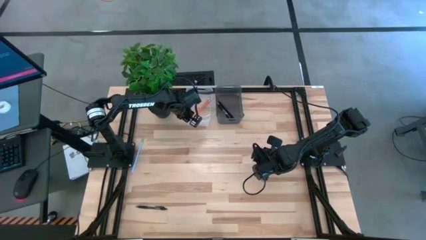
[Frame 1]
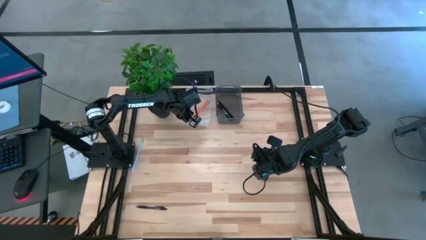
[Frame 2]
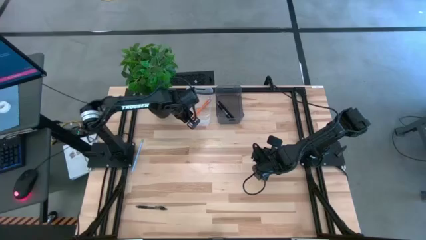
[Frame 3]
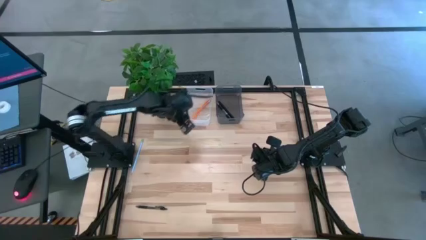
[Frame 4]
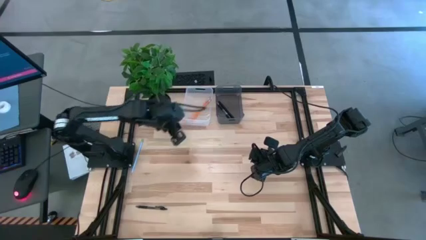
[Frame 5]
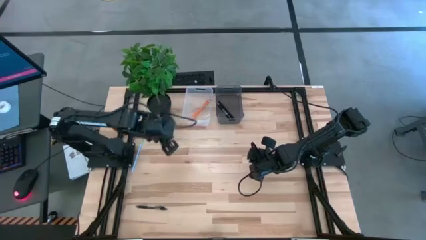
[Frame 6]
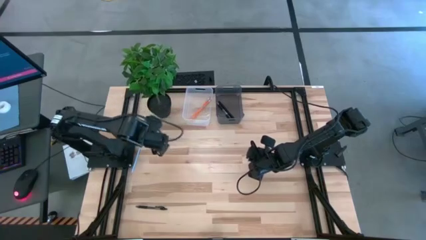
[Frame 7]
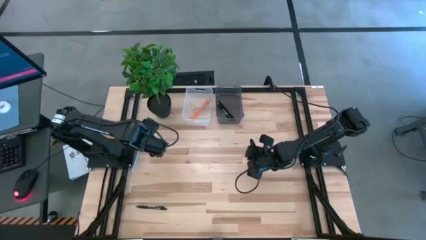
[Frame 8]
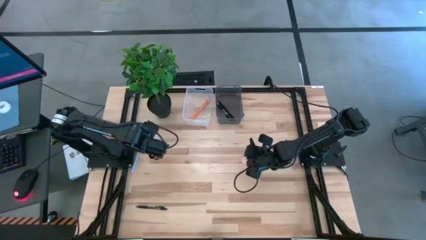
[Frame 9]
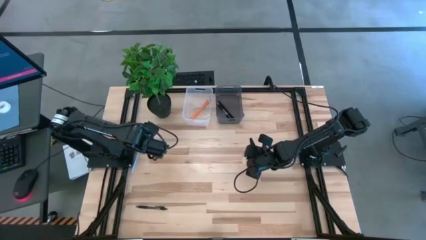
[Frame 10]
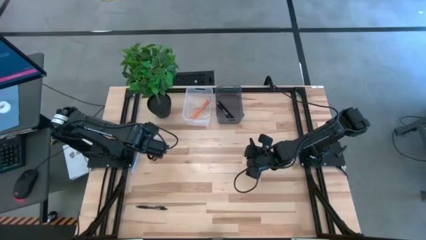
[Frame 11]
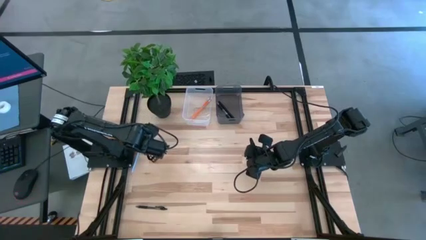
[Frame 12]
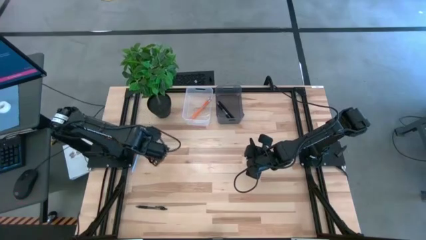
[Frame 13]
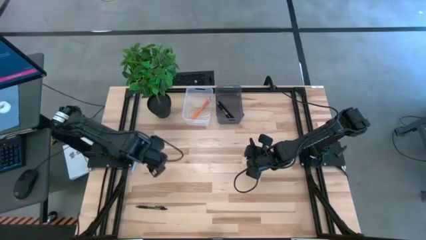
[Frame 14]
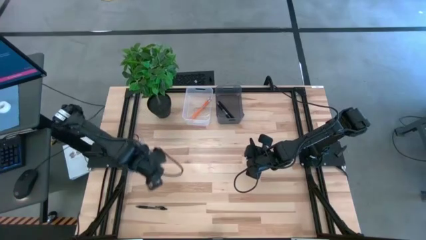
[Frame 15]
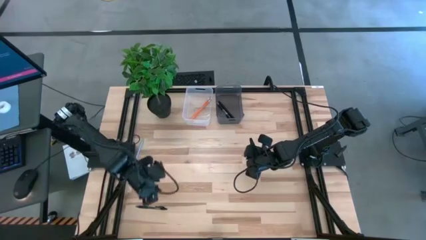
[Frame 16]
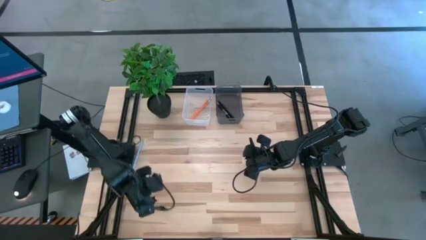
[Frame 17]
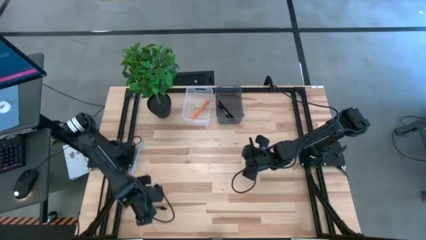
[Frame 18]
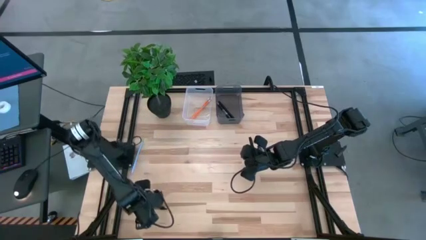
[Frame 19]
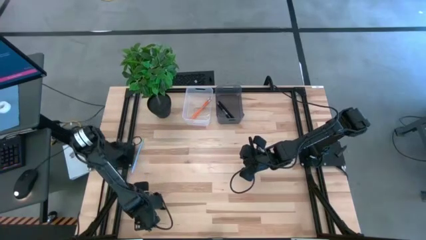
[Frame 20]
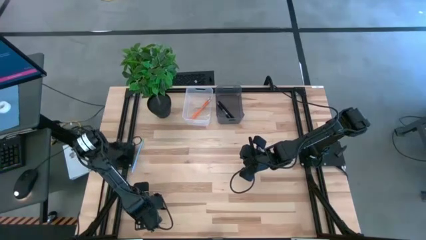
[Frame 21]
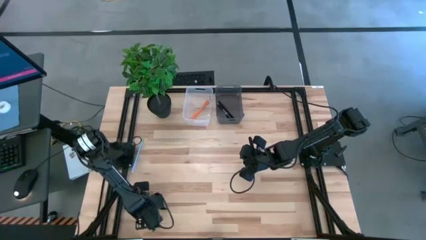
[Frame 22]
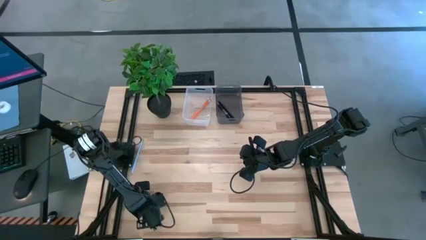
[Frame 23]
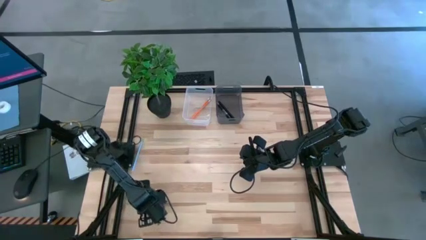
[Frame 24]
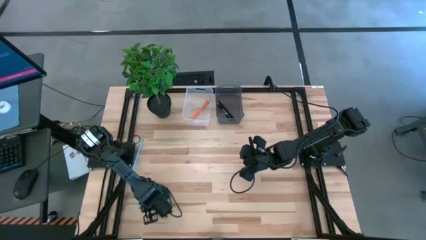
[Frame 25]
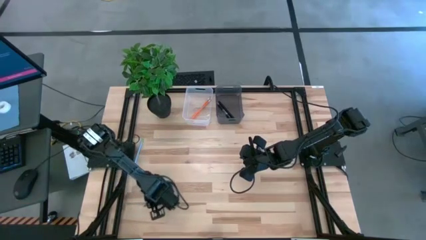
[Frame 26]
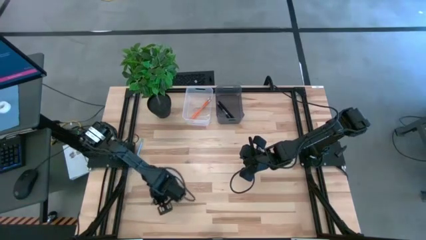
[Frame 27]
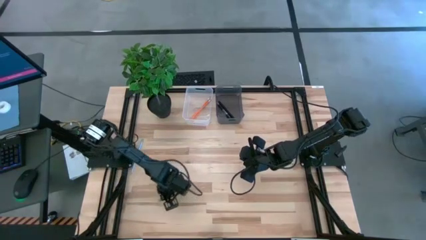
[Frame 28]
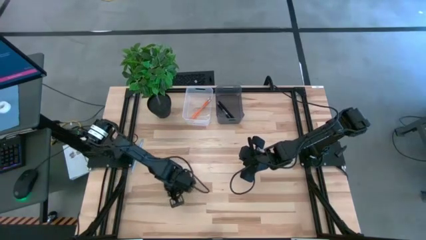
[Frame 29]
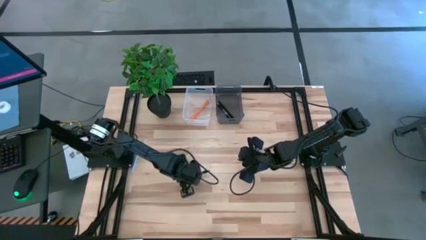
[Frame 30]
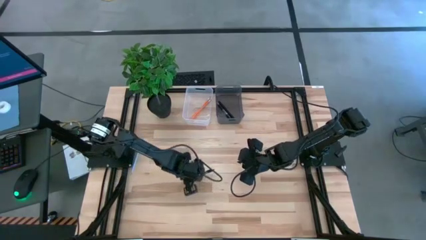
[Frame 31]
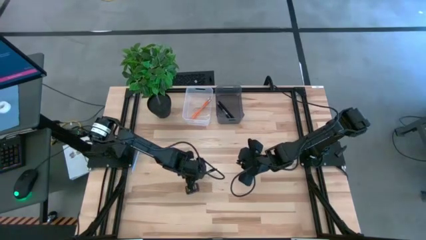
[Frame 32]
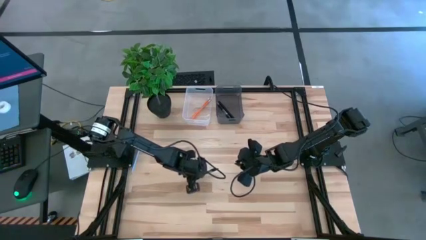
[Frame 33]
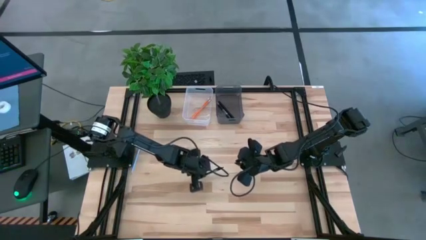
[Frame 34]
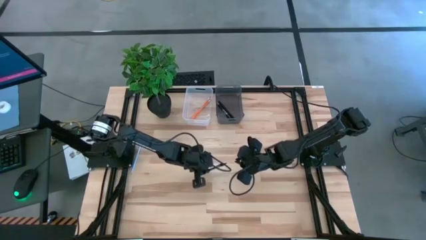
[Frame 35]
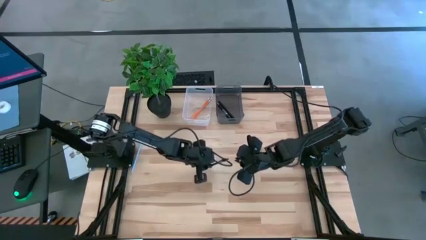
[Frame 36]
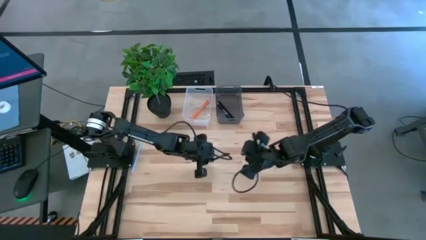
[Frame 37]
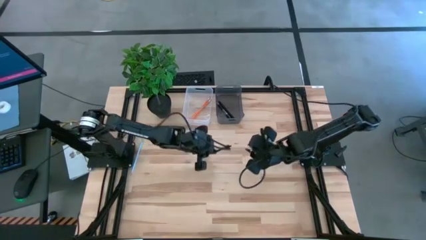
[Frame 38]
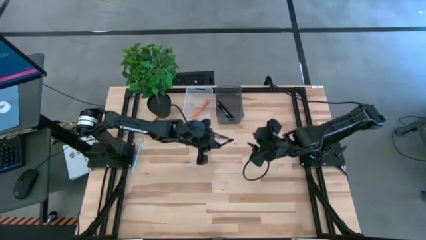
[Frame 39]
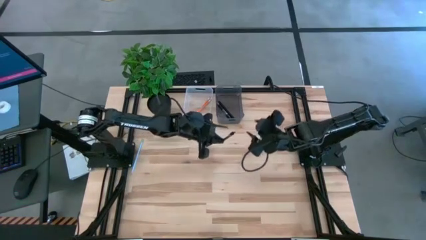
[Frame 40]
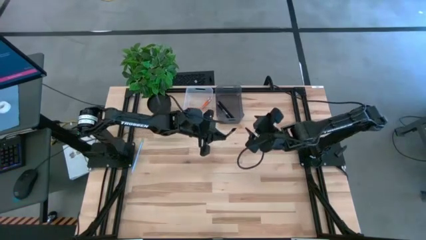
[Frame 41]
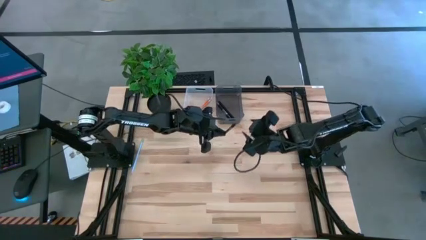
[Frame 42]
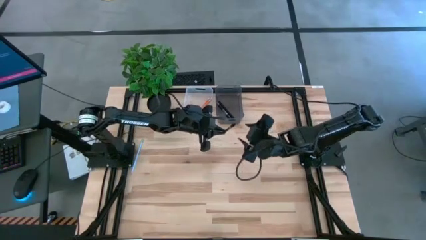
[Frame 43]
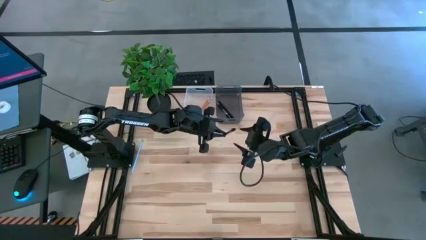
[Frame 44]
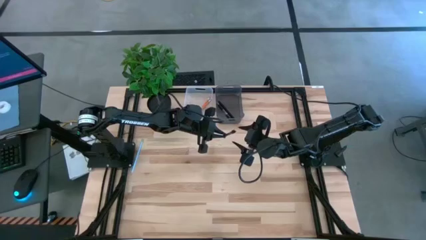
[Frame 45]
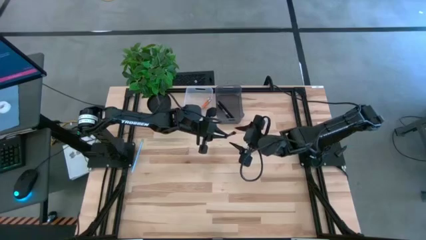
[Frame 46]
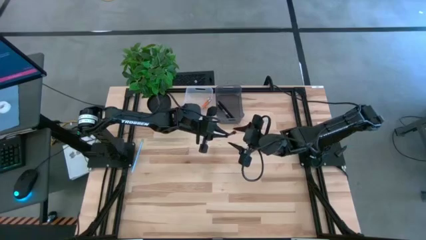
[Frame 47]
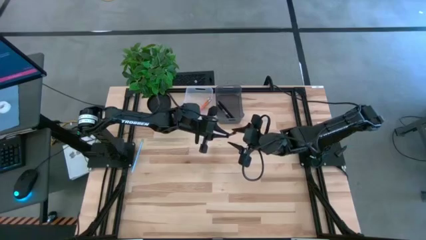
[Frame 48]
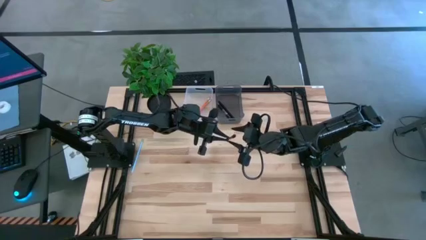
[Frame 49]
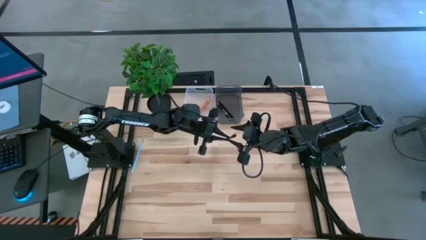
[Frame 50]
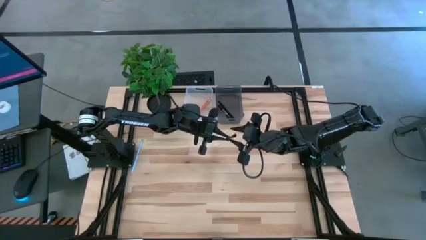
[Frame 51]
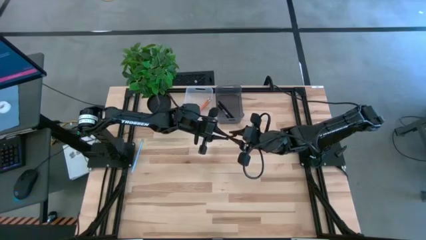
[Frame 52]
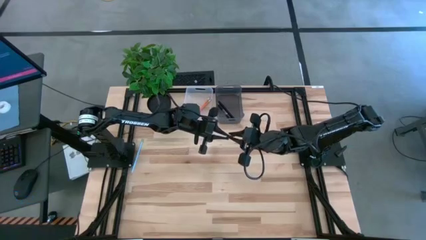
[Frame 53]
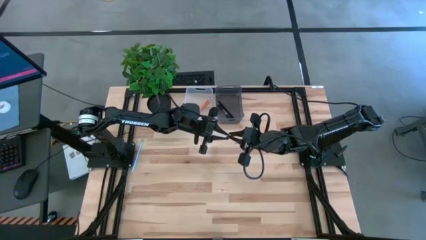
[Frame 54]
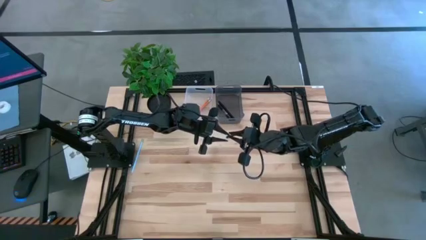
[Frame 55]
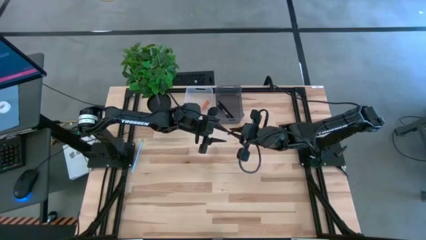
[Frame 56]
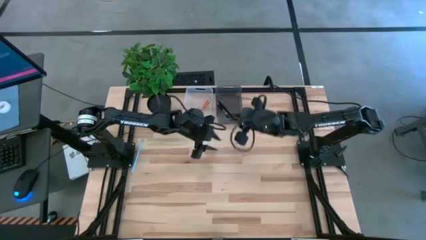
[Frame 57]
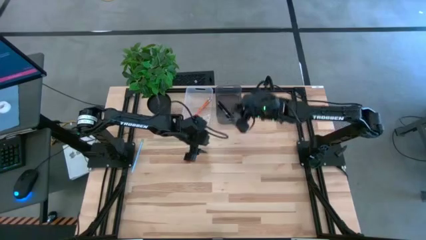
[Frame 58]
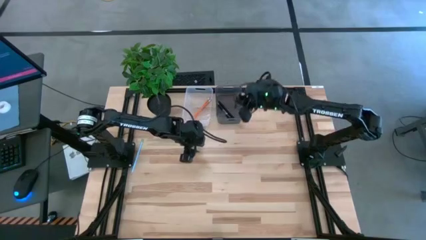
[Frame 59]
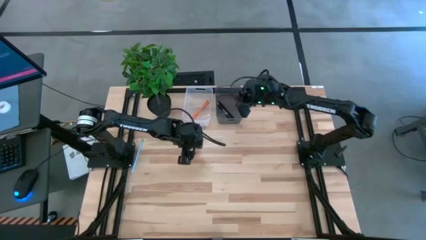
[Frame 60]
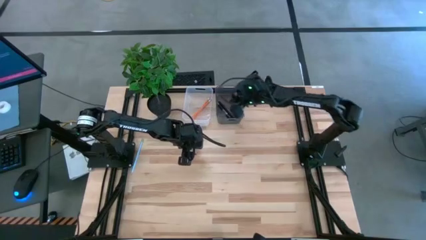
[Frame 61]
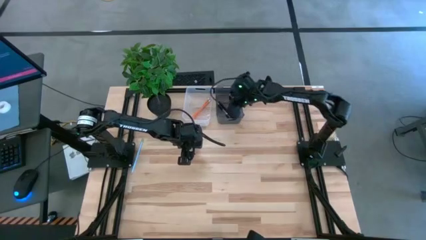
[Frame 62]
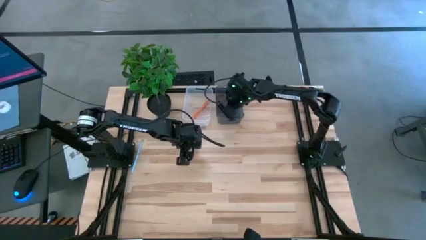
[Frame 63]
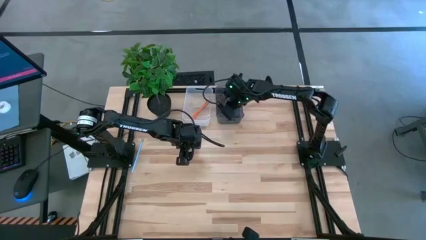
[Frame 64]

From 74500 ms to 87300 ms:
Task: Sort pens & pencils
Put the black pen into the black bin

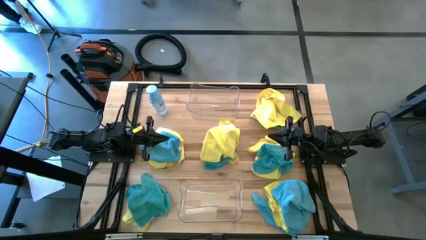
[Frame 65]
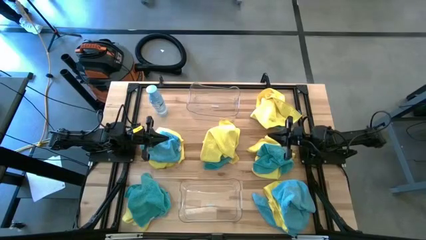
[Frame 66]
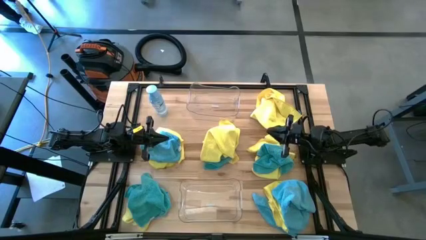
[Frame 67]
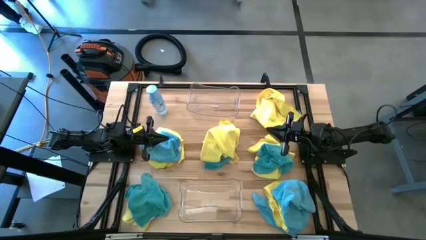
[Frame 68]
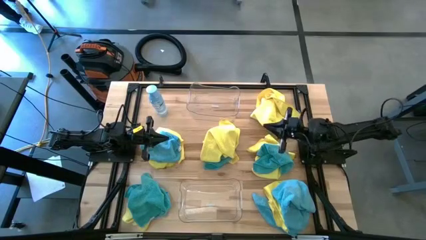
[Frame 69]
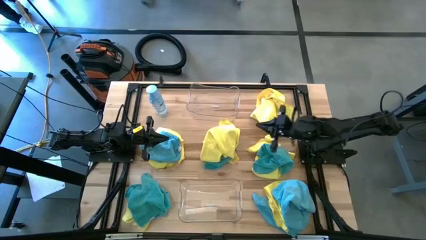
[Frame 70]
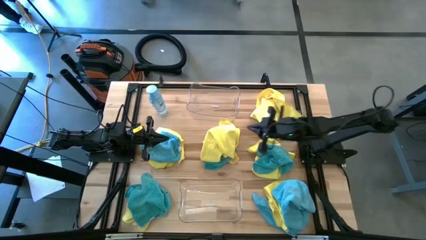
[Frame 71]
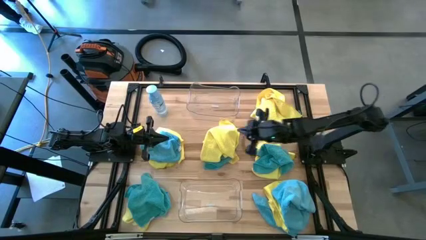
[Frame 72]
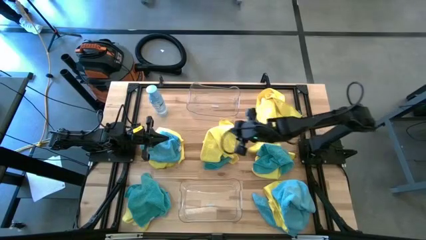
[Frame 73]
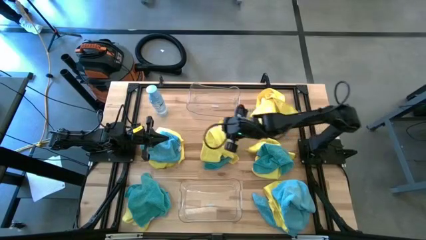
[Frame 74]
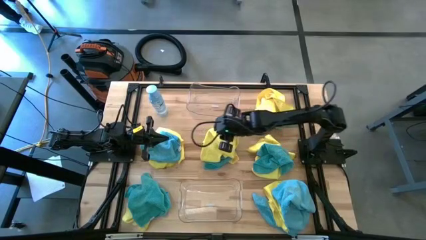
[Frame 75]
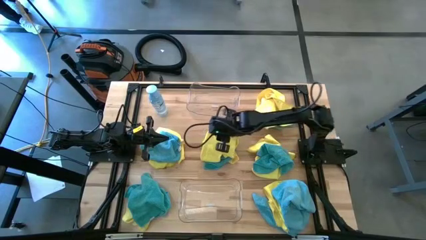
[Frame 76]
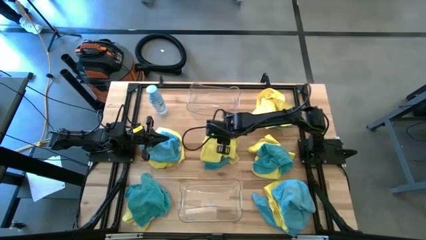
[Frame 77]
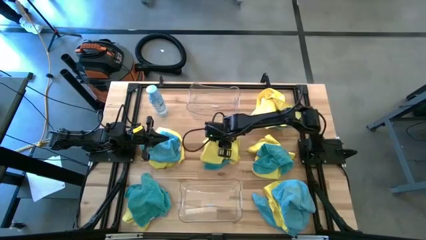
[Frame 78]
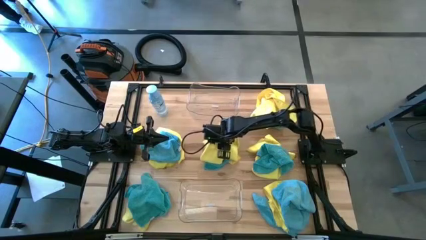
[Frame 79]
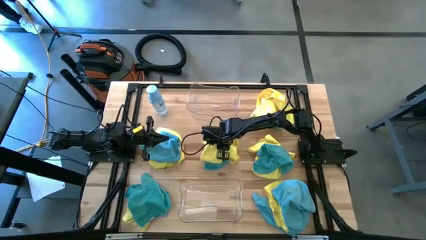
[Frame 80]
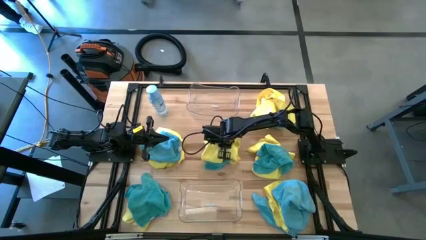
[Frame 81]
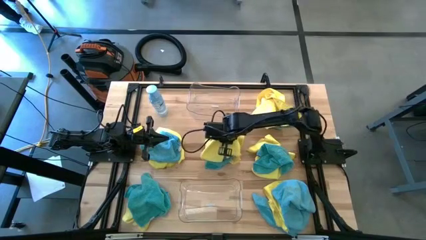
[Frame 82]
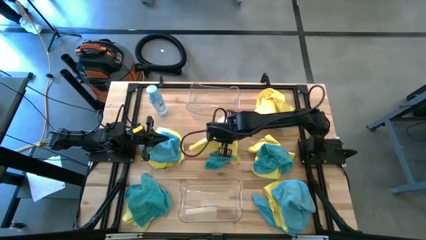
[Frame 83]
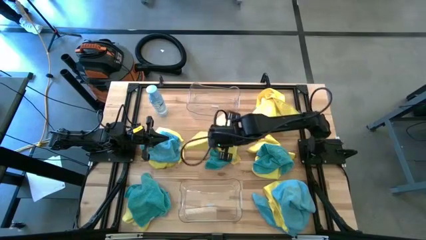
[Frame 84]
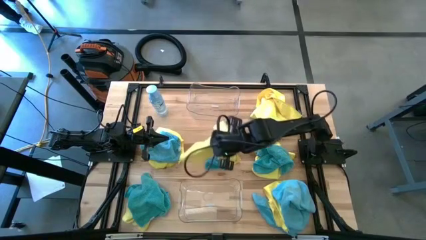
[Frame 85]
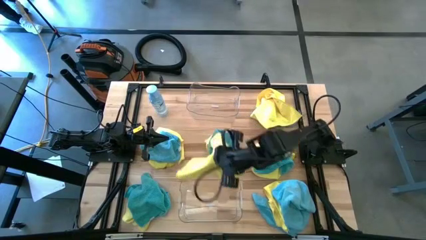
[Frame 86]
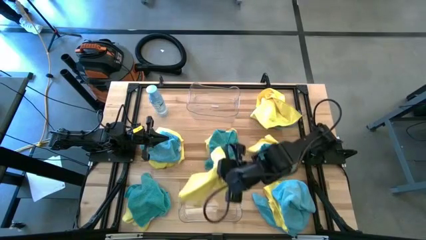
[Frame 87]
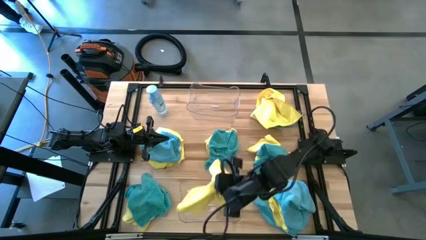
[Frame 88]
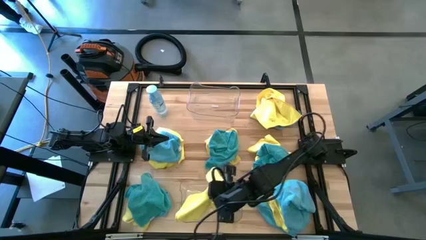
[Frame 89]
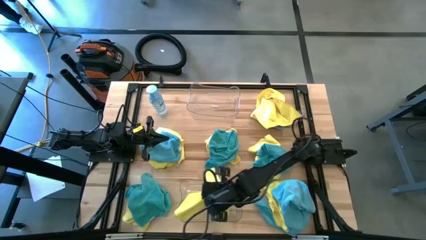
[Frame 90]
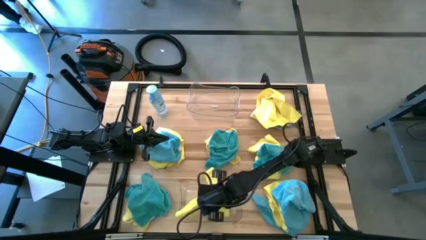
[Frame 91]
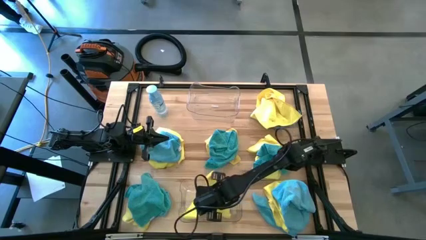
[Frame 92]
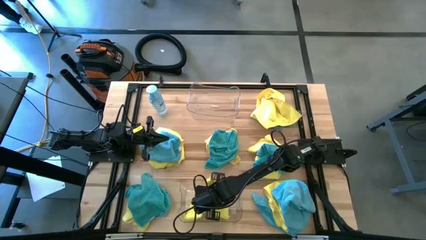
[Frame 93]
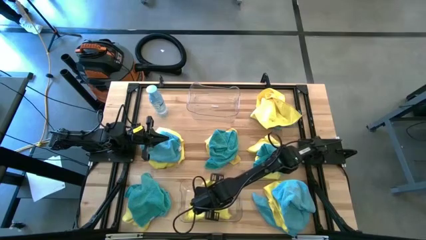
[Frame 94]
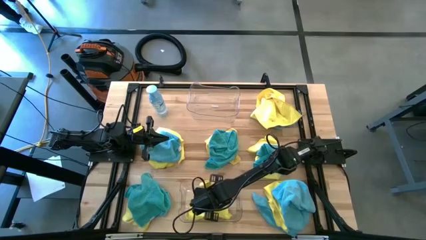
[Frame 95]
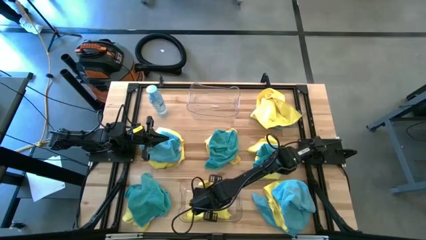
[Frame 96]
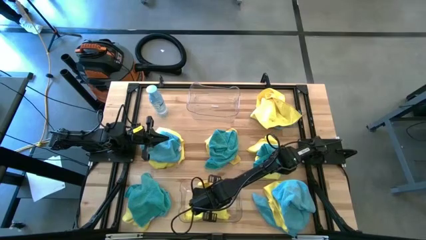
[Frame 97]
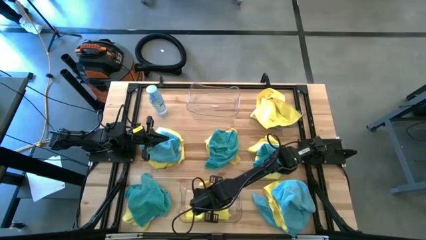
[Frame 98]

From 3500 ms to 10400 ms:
Task: Sort microfiber towel by color & place in baskets
Put the yellow towel into the bottom transparent bin
